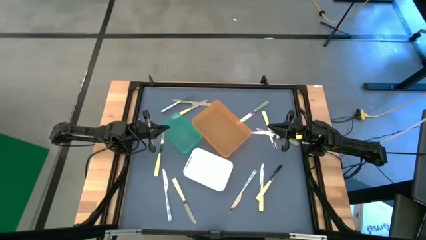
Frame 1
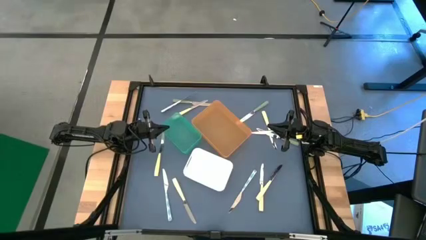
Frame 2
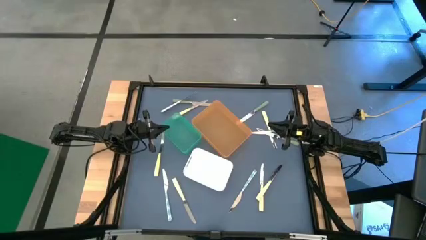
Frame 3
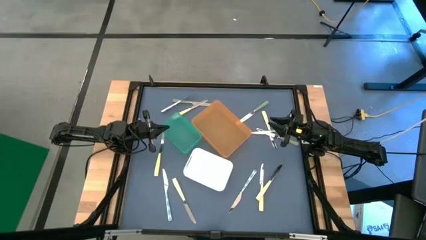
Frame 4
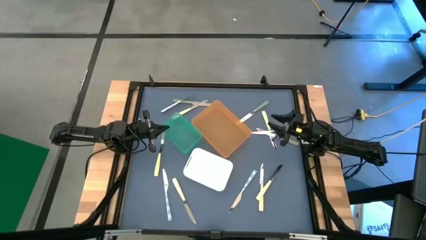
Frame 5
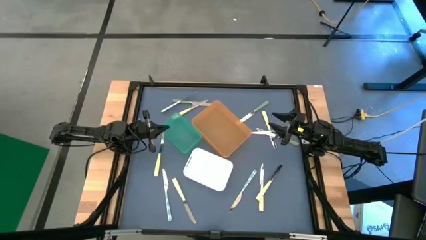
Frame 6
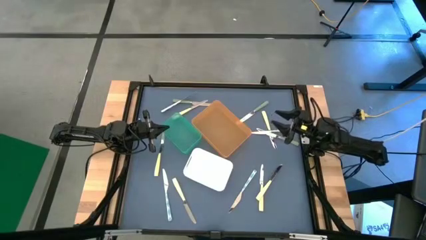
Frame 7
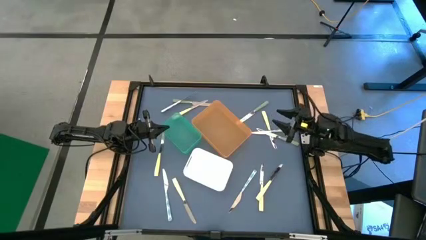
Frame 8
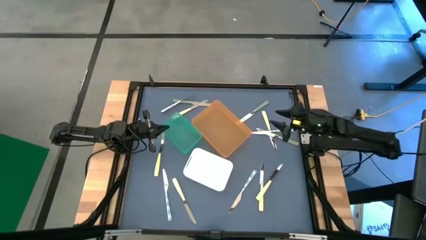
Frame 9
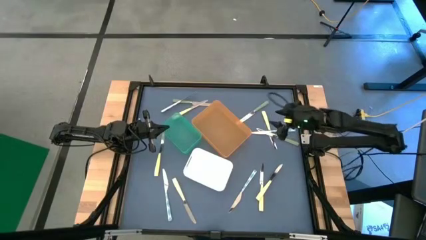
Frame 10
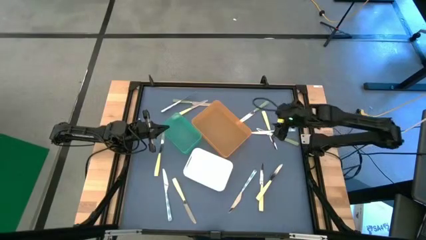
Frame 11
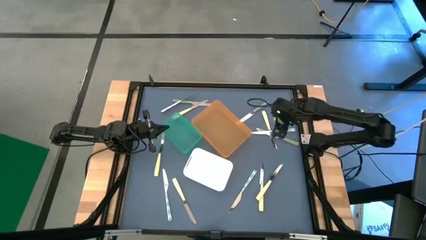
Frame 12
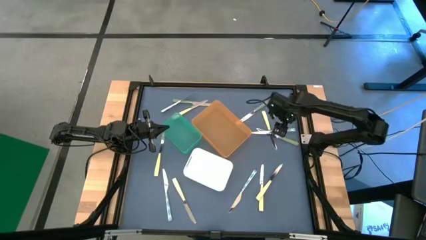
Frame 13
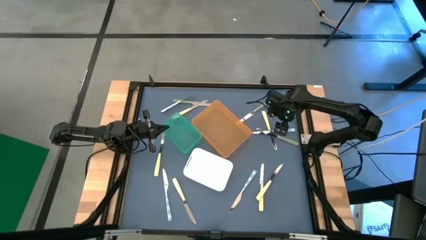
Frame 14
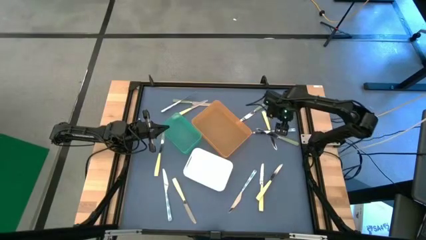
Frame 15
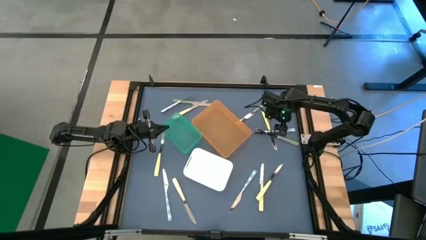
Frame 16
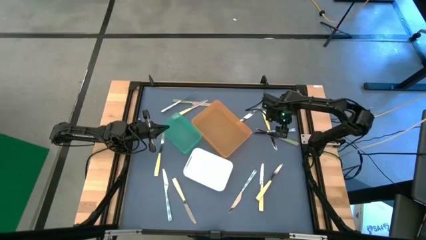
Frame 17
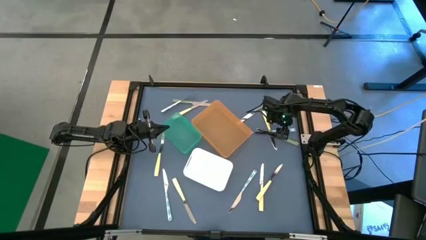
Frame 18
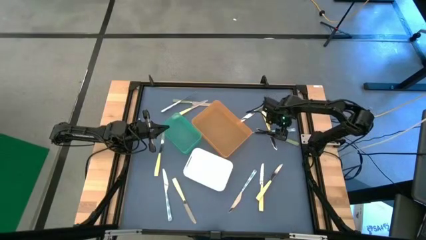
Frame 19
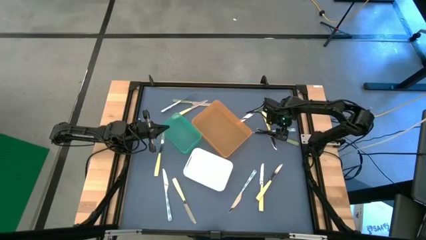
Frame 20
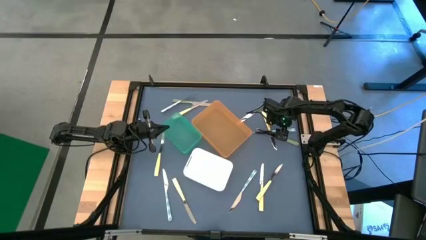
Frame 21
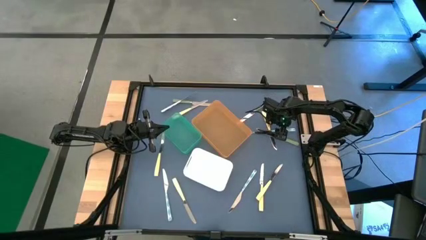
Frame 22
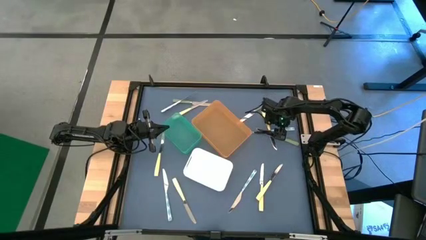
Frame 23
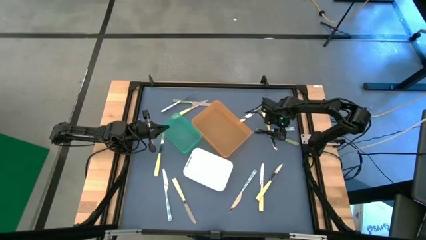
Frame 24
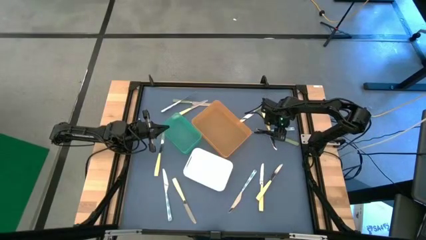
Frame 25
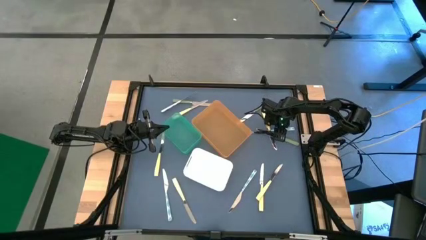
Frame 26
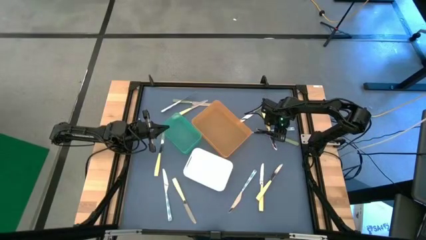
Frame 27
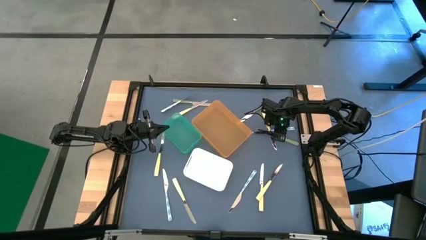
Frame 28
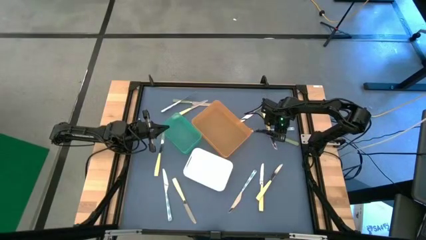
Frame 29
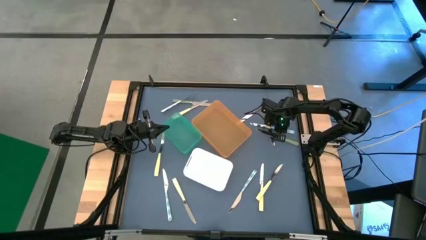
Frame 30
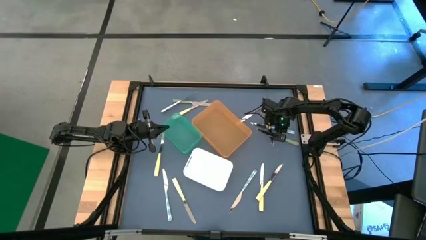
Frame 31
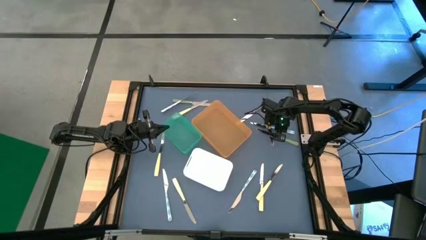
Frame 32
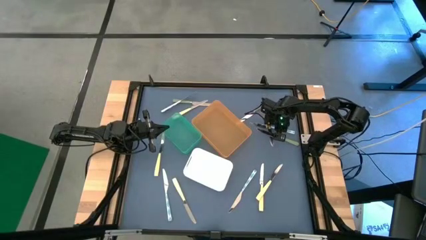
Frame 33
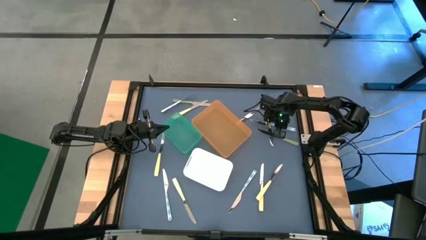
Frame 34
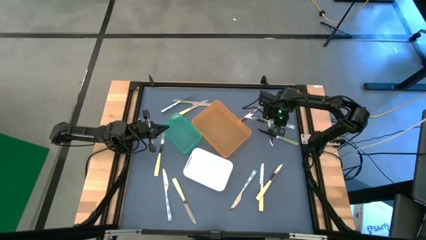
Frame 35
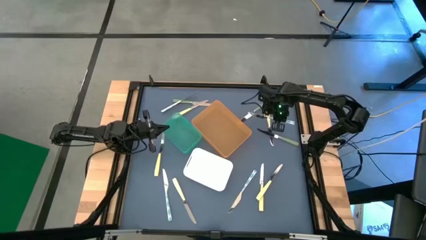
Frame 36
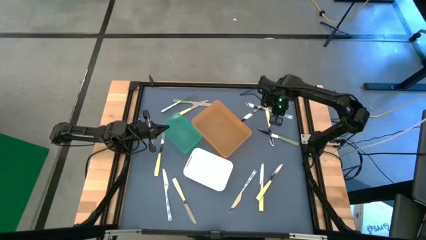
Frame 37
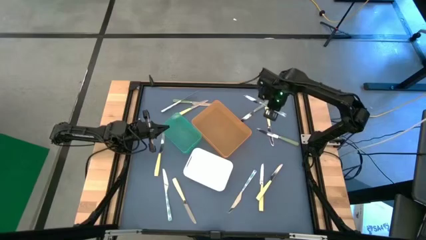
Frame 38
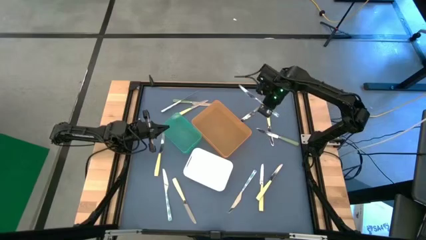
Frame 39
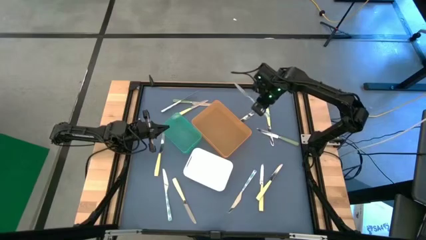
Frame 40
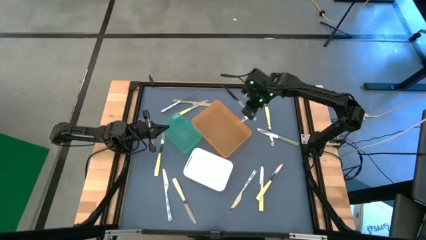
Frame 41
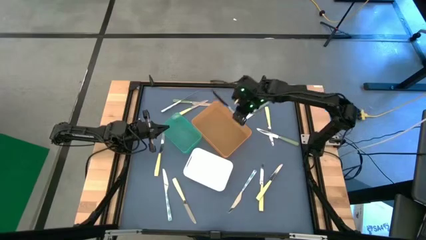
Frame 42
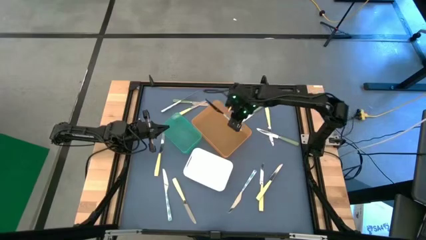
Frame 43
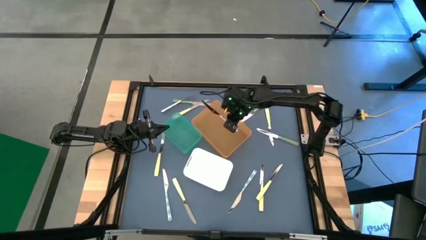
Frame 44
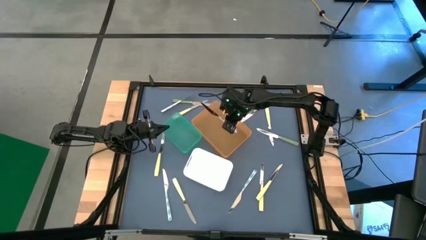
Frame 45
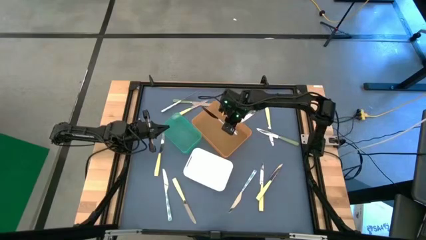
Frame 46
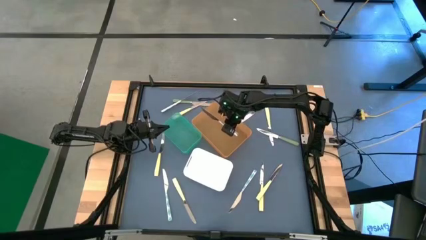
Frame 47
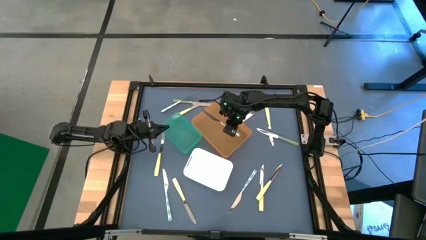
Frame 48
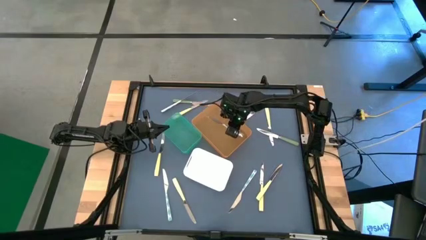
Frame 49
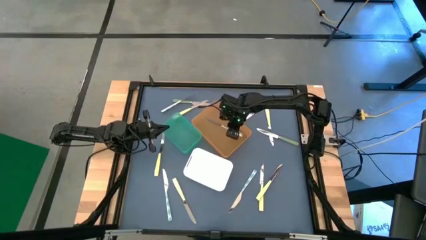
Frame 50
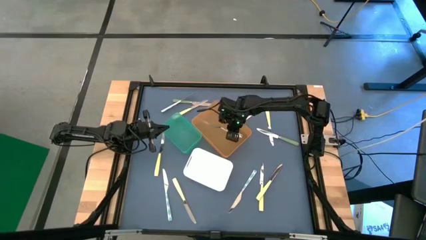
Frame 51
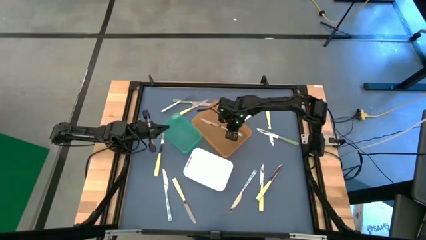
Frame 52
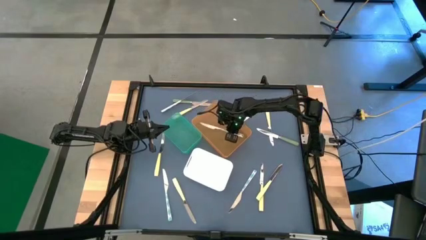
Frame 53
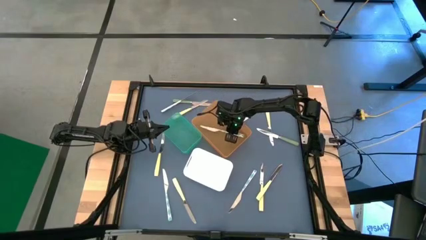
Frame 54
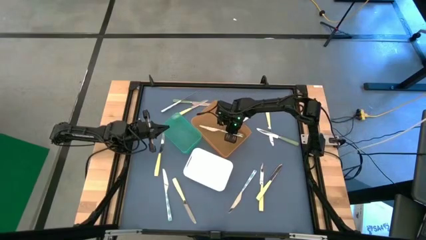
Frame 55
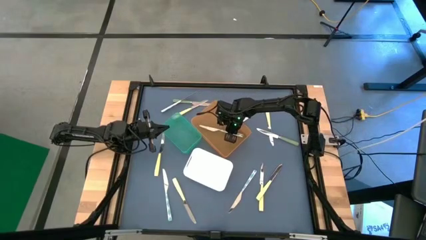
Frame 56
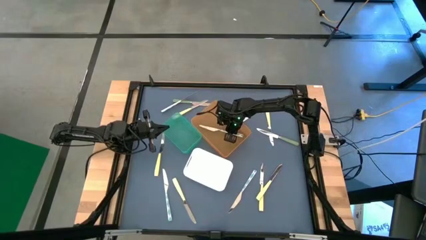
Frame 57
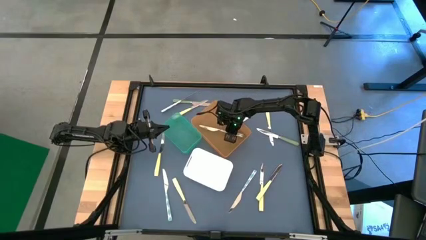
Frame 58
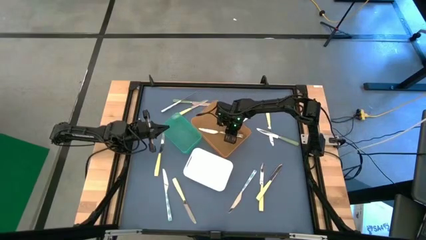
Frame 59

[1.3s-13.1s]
Task: Sort silverware by color (type)
Put the blue table knife into the orange bin

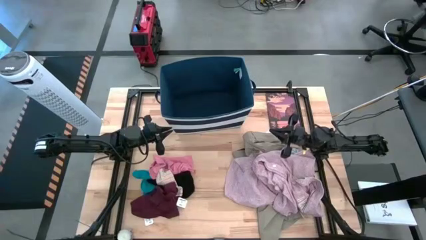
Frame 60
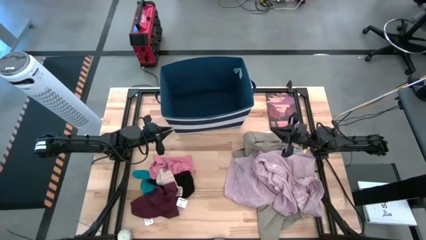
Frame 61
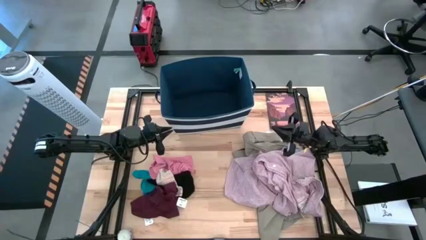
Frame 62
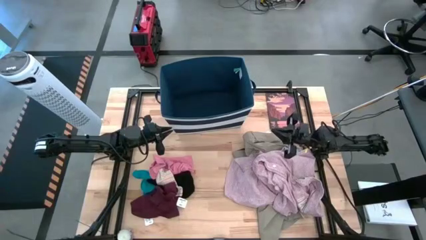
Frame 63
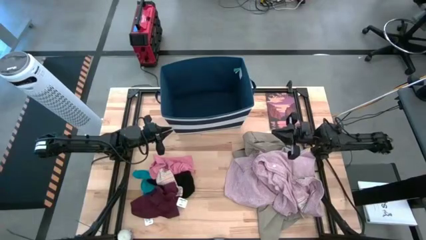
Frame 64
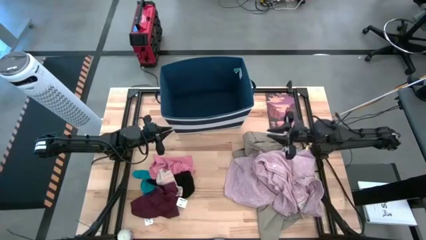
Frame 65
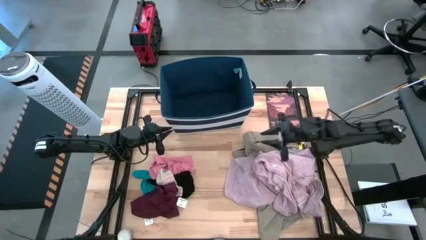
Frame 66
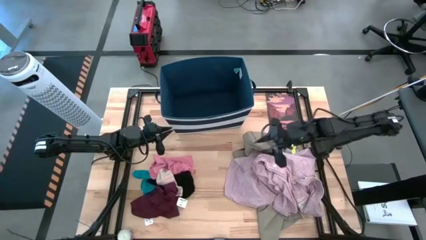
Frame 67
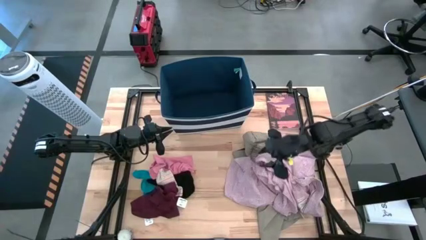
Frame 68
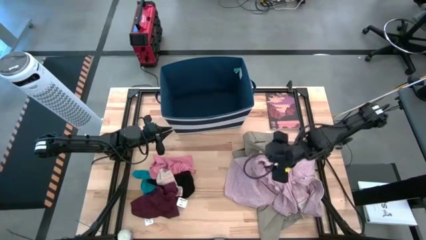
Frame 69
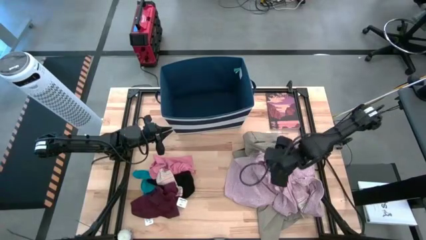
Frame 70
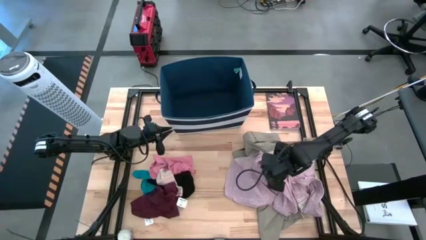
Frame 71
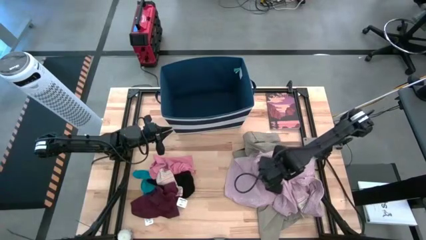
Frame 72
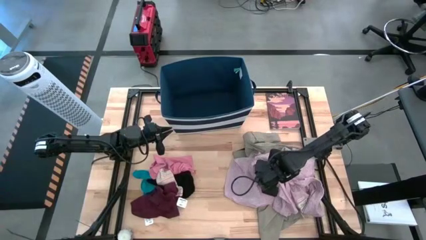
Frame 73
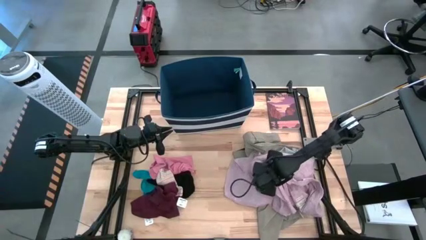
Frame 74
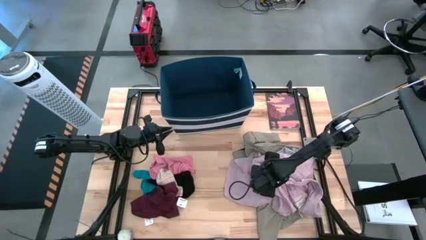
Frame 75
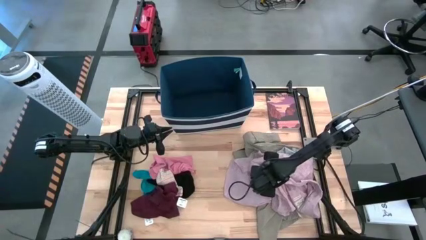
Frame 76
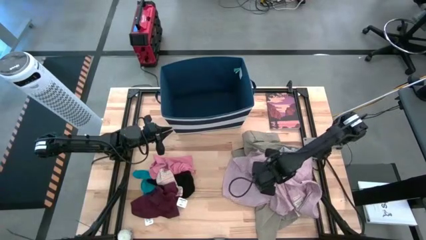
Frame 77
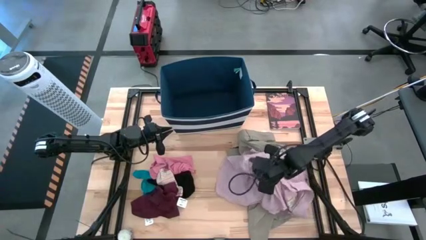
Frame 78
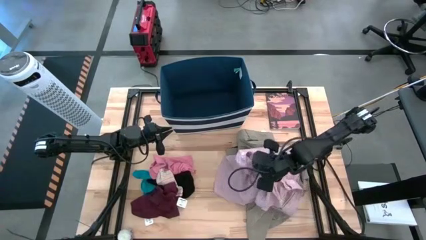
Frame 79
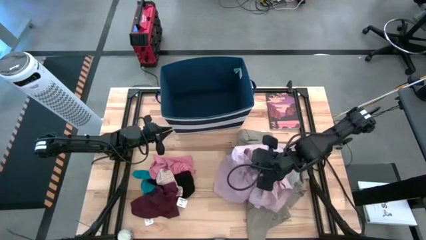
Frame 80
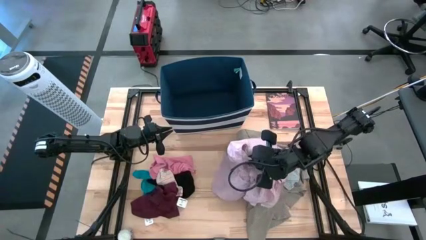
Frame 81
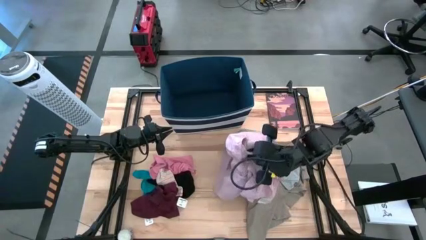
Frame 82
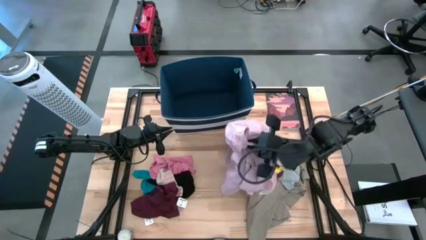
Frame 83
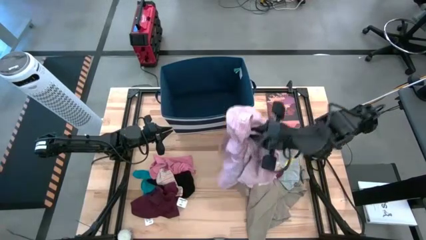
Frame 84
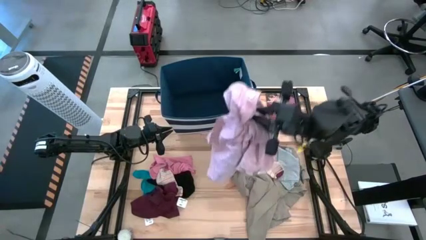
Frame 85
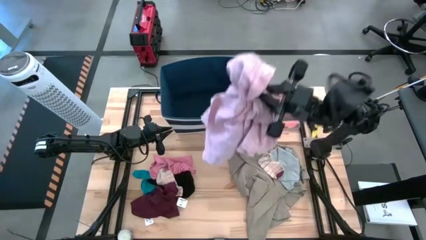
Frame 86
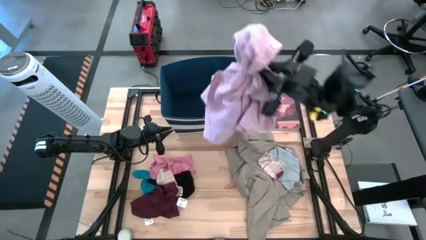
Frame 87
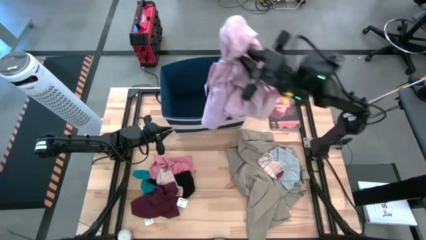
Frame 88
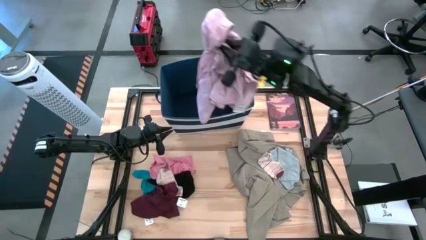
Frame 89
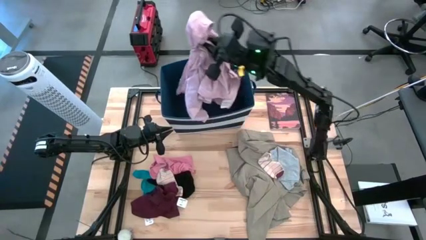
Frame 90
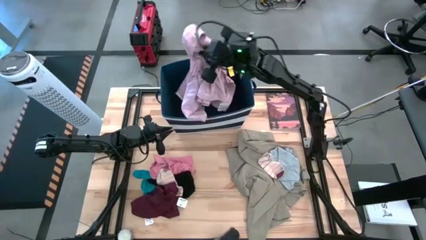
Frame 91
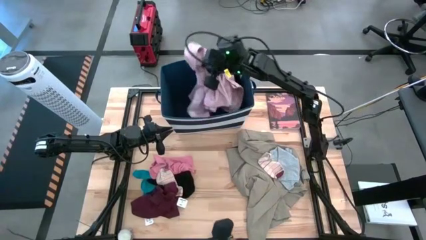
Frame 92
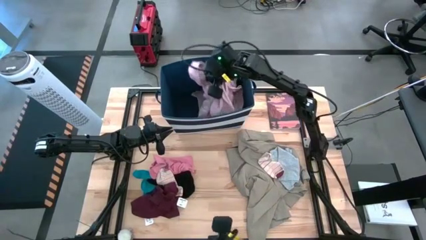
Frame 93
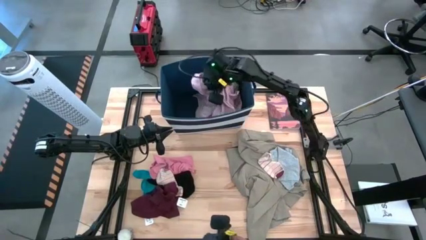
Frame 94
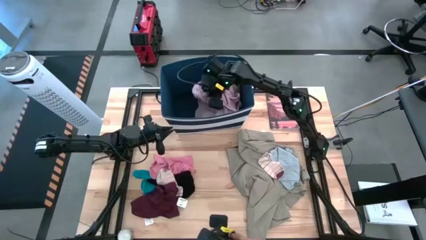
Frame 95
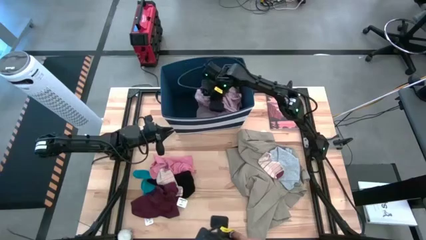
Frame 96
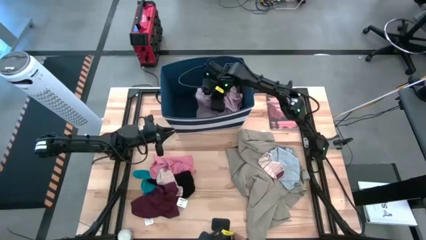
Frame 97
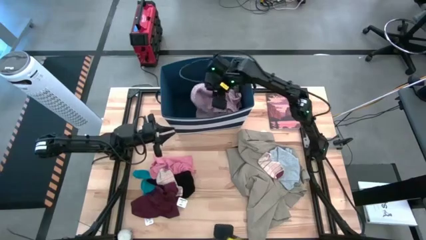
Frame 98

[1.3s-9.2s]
Task: Sort clothes
Put the pink shirt into the blue laundry bin
